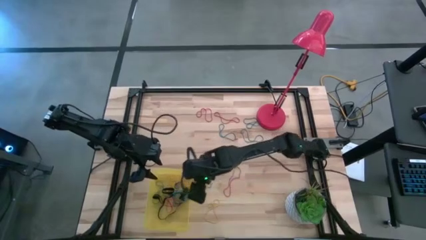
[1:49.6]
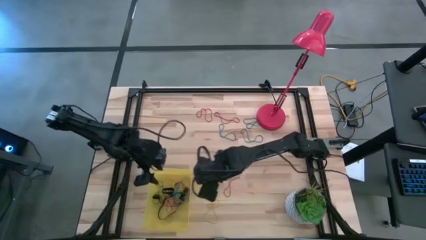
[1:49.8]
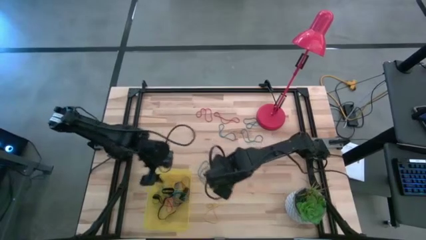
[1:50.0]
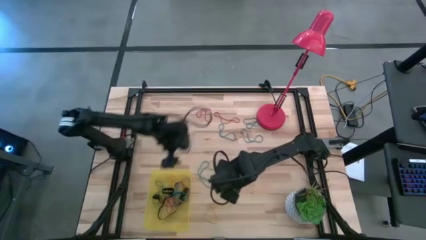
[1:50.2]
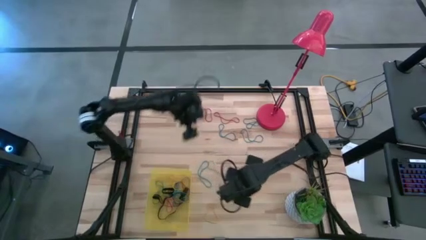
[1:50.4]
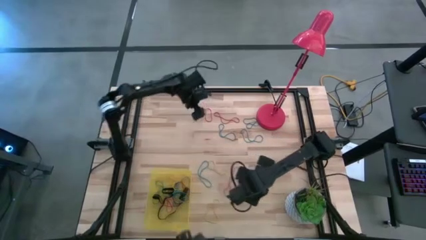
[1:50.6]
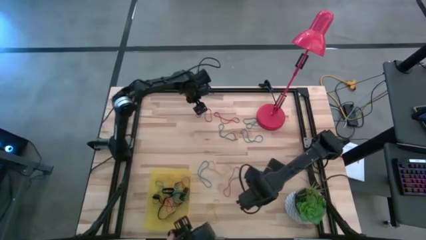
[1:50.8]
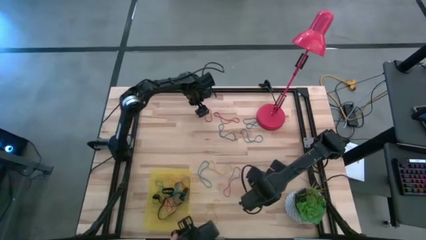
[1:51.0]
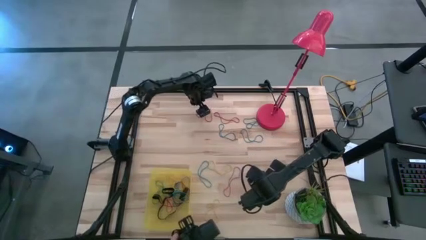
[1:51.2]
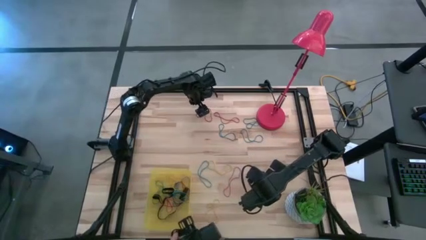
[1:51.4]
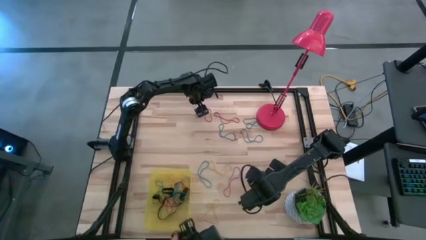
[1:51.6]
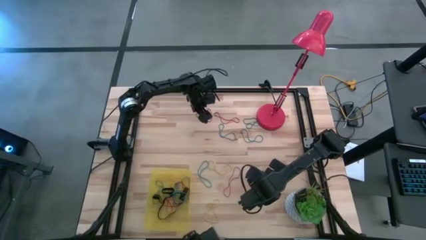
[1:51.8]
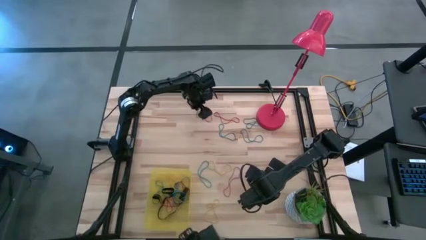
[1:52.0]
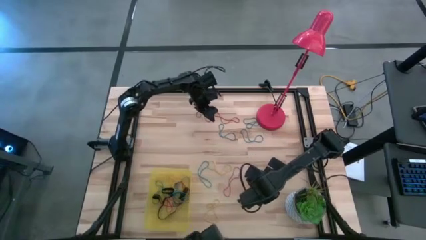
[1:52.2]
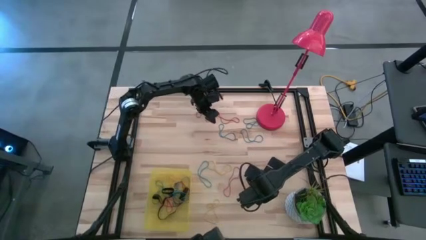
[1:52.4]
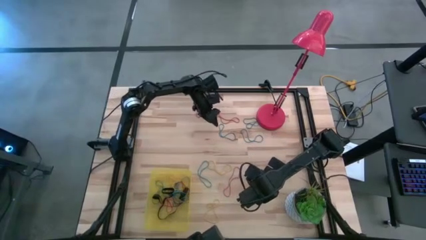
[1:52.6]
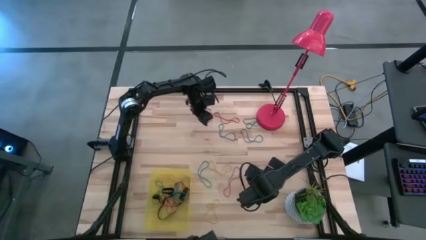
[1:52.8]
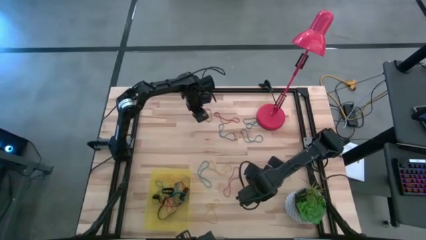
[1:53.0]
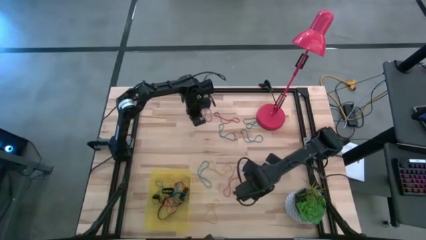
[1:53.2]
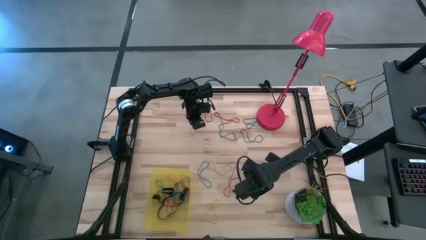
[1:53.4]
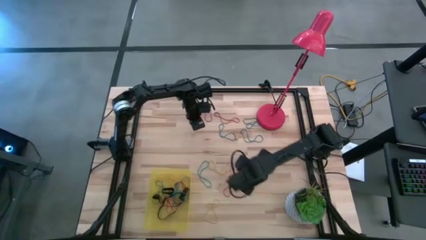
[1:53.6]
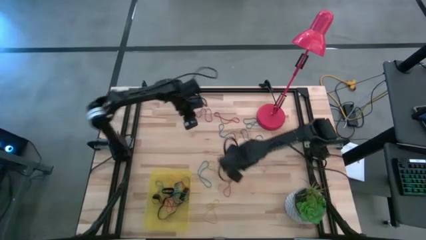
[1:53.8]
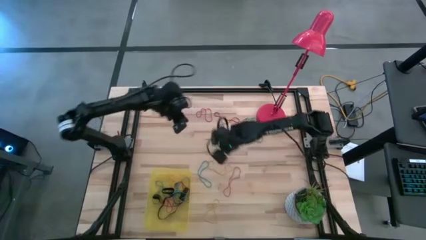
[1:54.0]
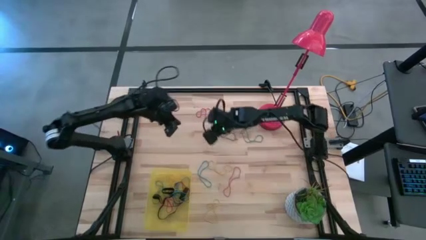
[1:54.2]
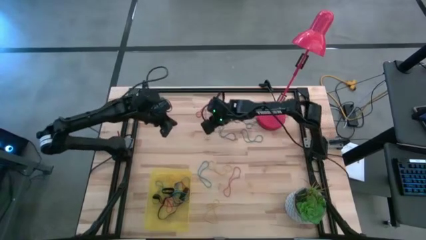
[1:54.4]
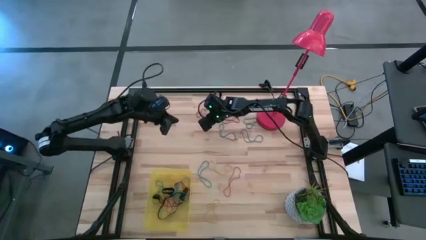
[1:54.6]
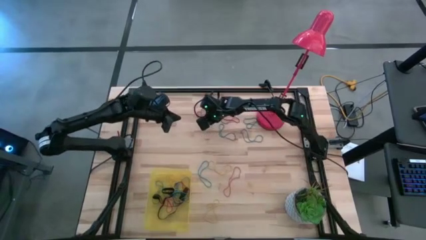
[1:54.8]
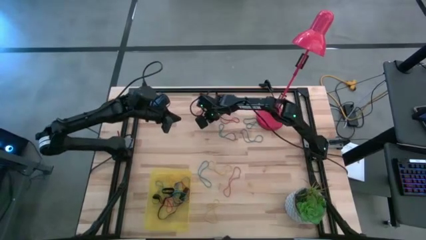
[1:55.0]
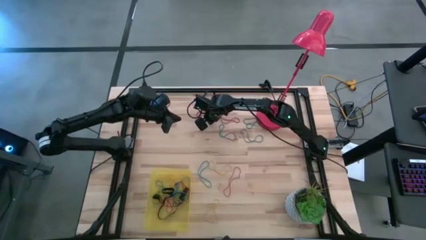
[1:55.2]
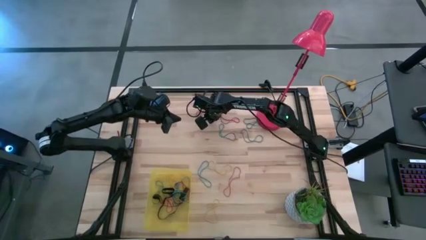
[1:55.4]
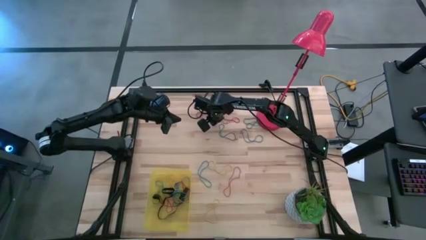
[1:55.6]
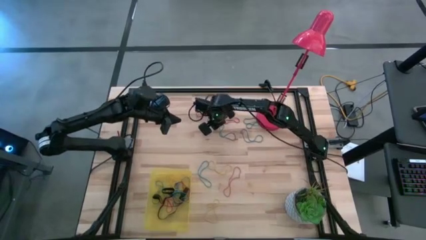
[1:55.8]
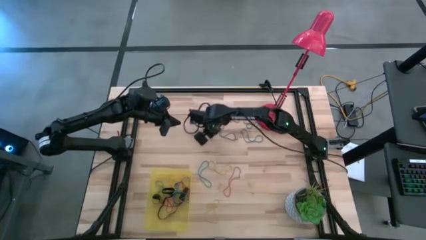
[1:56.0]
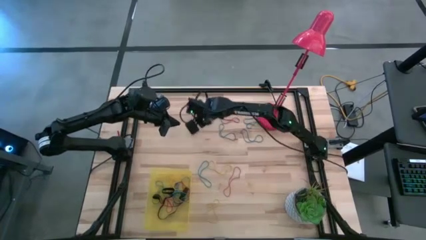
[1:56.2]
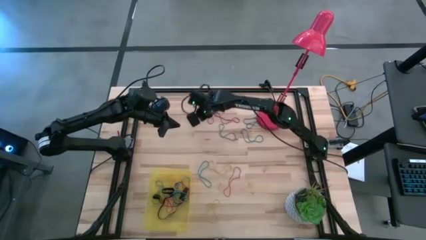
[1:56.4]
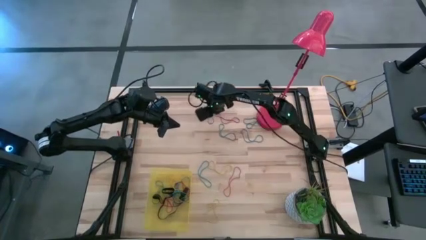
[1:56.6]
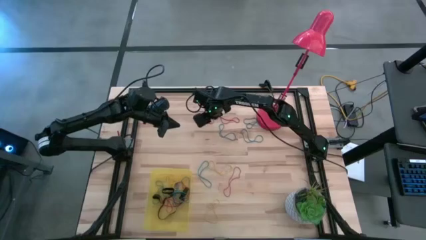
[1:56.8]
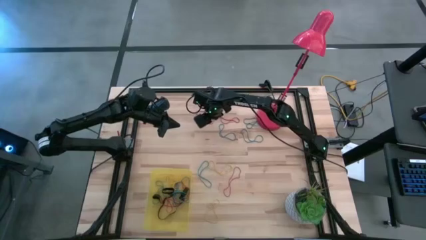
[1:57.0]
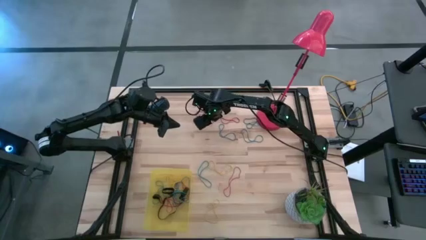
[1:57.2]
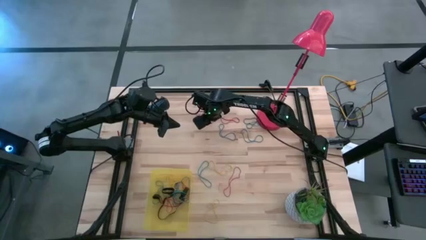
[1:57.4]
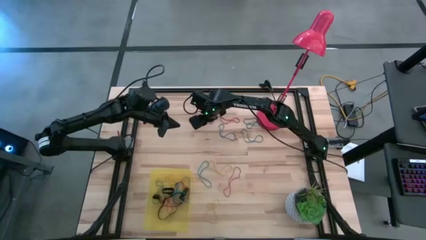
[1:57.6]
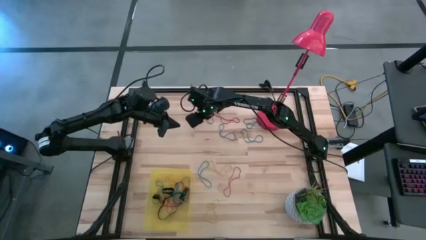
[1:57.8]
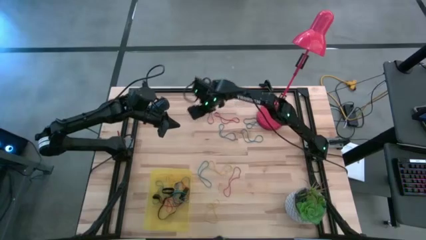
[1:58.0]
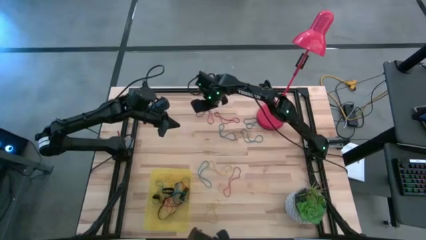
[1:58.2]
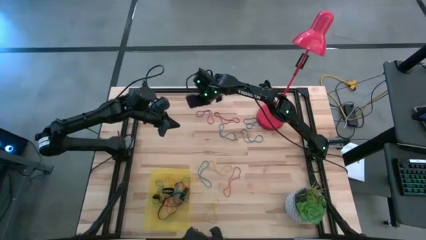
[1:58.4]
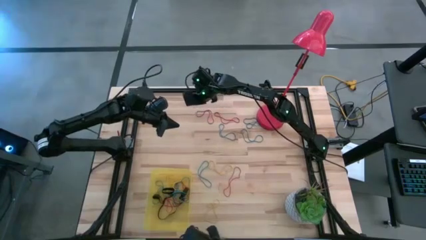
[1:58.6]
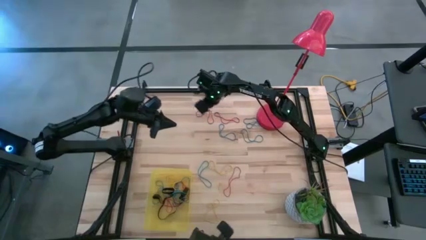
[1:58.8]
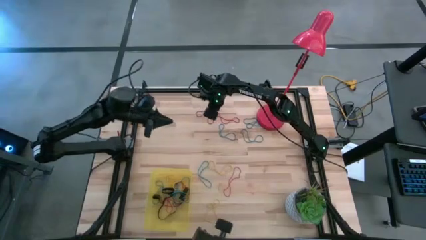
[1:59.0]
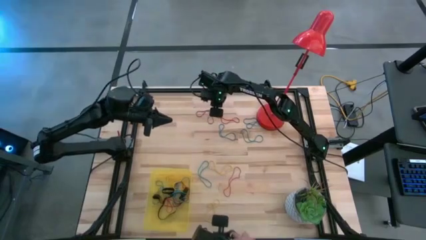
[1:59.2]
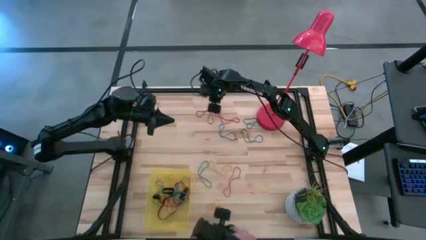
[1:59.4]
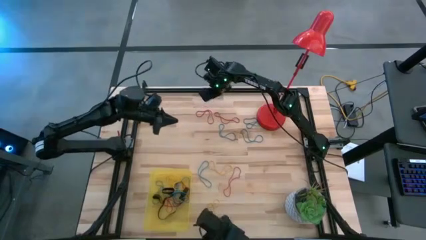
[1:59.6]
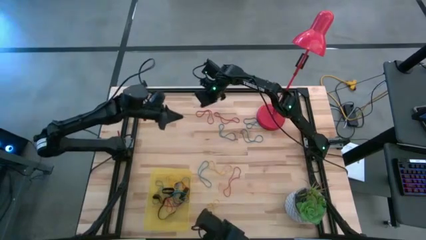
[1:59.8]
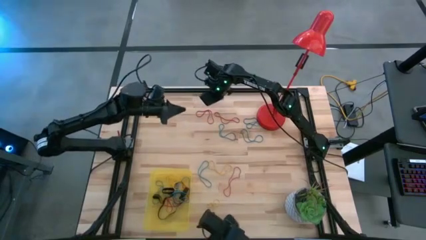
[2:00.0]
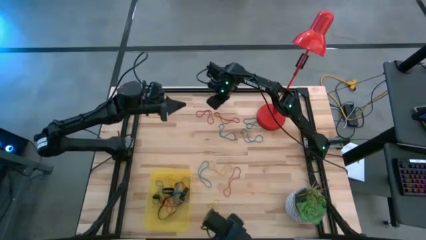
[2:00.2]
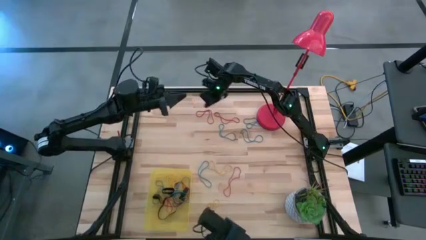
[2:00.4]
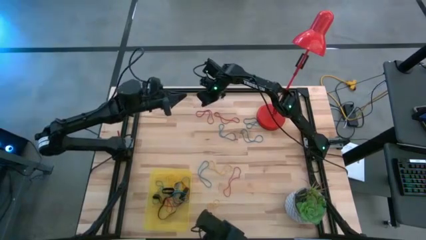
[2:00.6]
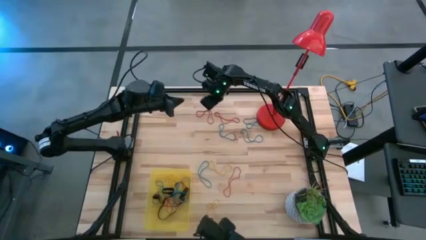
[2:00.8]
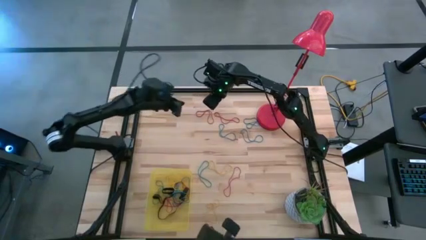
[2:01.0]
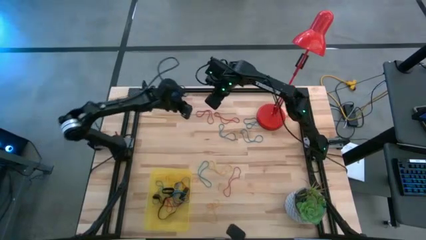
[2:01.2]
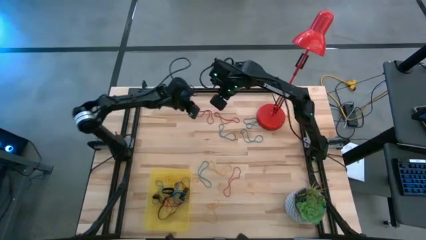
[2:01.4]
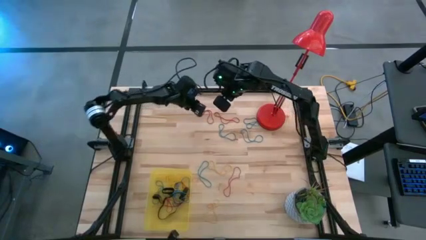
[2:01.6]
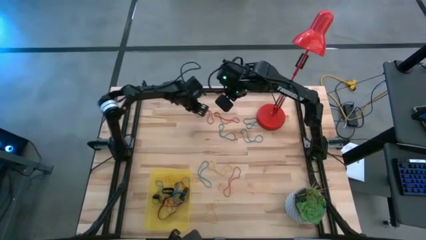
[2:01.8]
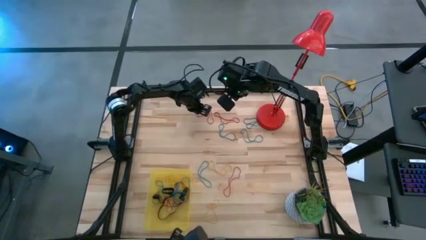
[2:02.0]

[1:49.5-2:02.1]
Task: Pick and place rubber bands into bin
Put the red rubber band into the bin

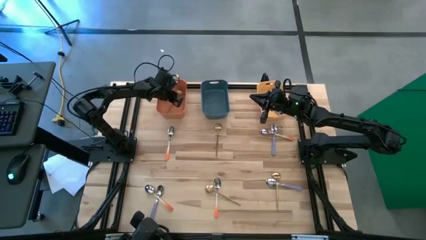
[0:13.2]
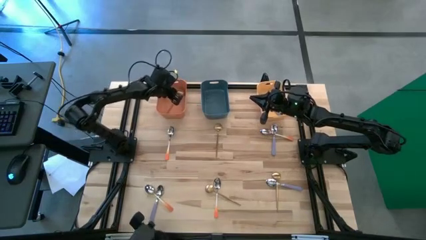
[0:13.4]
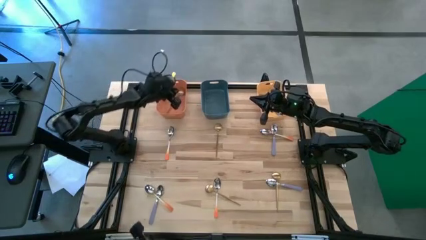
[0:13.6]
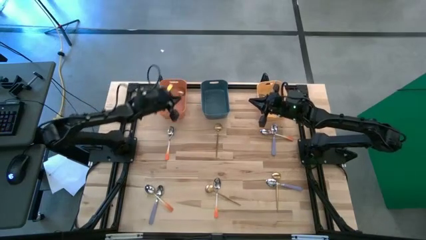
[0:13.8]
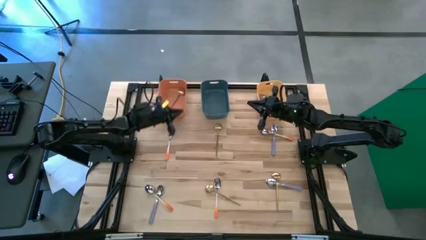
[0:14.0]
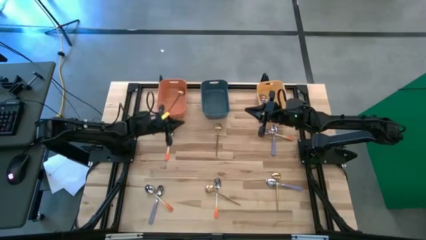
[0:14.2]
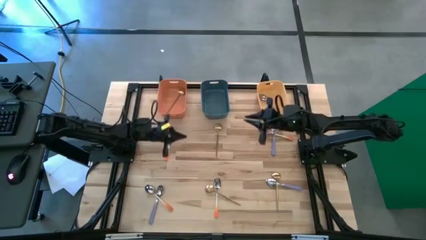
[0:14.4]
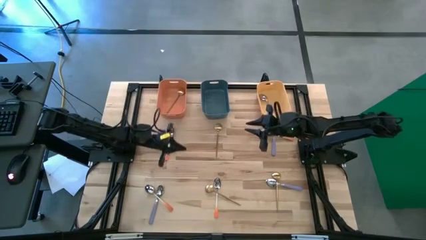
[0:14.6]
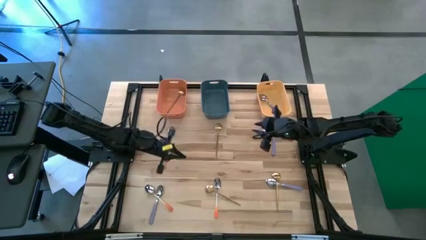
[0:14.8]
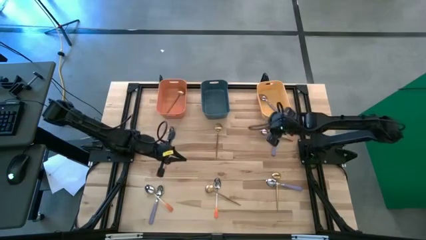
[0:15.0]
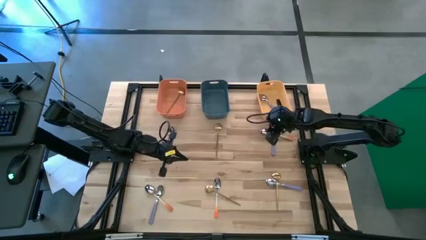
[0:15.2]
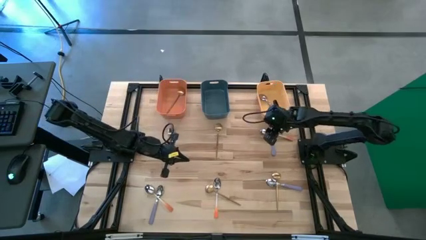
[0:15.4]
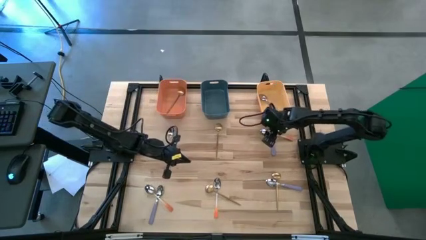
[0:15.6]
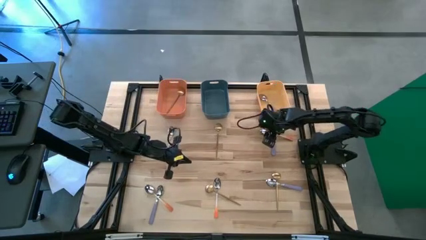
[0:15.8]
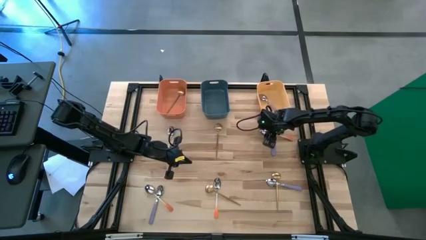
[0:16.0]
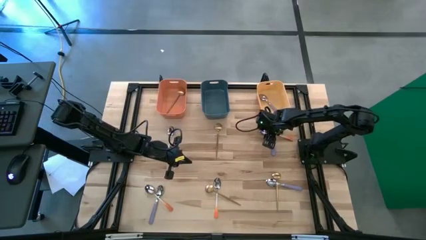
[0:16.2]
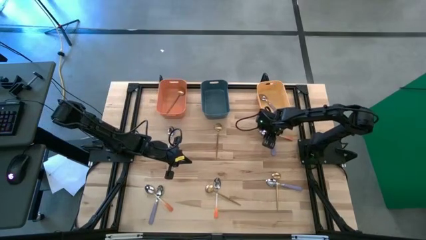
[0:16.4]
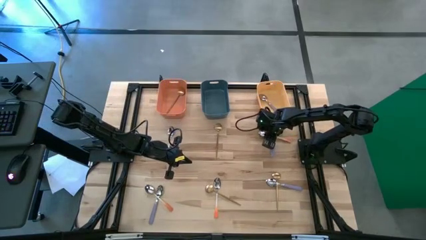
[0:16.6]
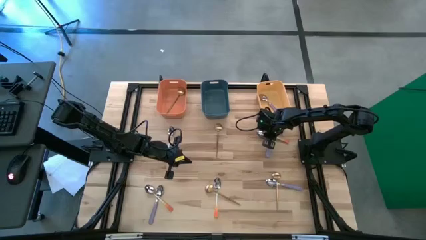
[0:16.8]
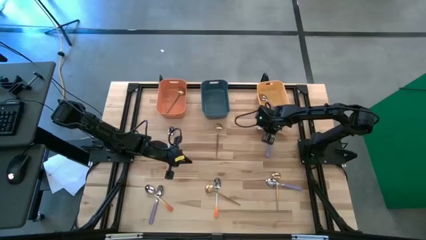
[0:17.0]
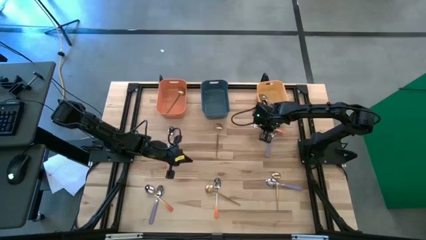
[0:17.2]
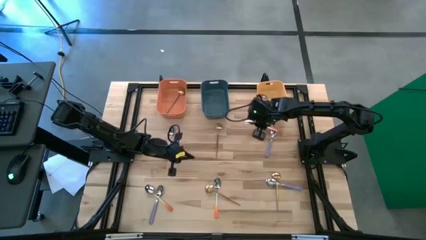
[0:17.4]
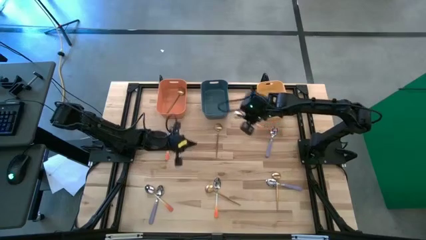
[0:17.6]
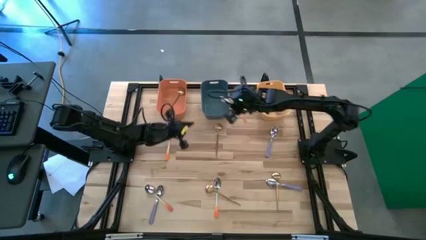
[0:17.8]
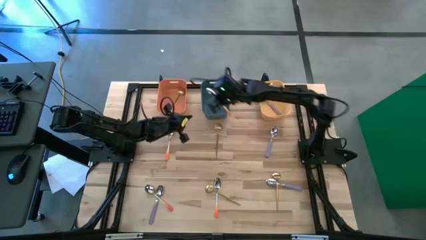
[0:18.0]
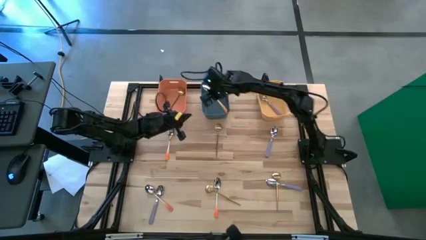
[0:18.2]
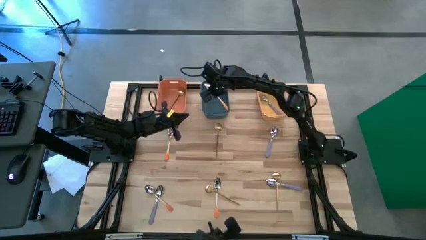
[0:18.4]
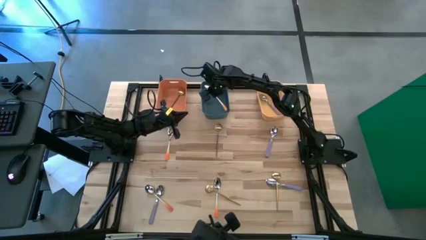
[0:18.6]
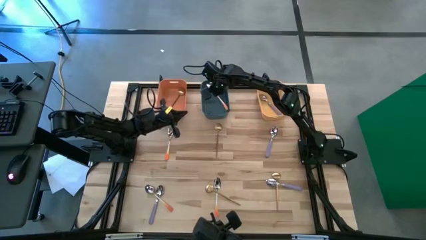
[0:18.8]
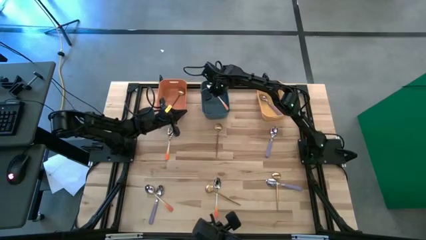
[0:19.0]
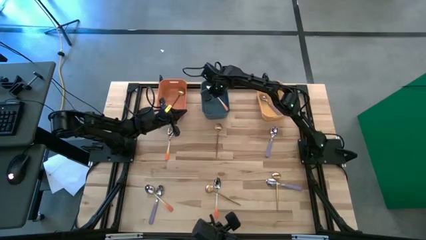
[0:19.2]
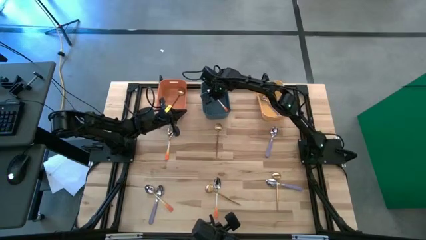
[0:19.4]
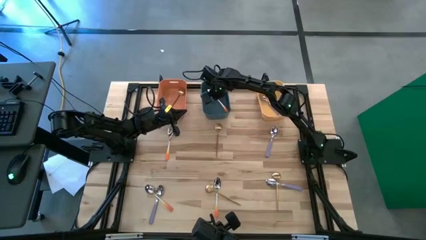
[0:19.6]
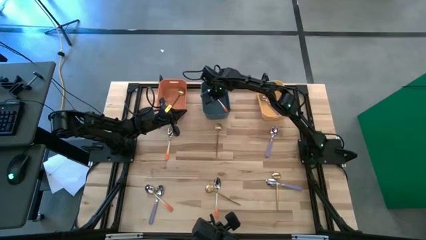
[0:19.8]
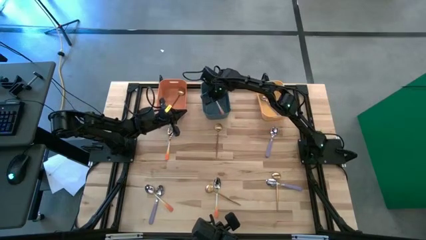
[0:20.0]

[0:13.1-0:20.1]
Task: Sort silverware by color (type)
Put the orange spoon into the blue bin
